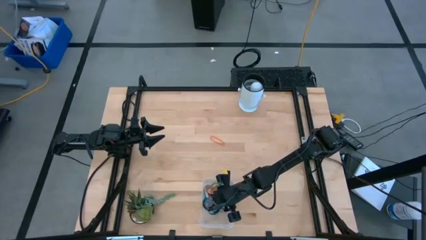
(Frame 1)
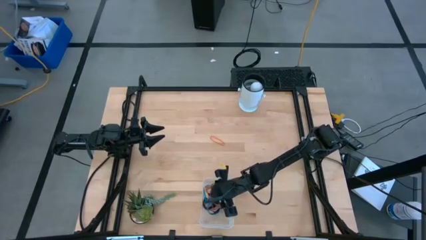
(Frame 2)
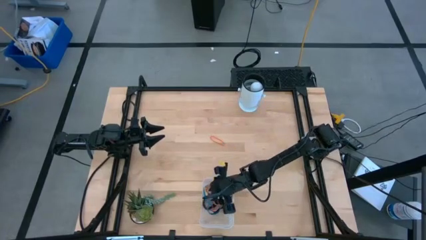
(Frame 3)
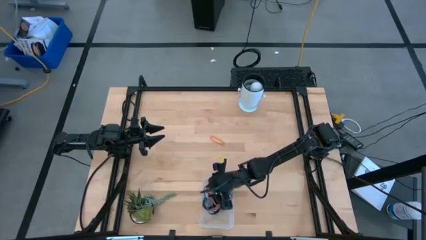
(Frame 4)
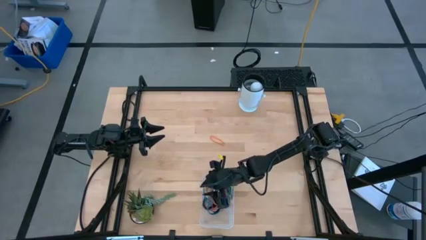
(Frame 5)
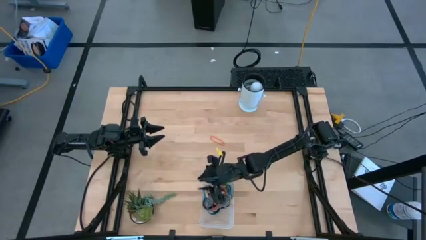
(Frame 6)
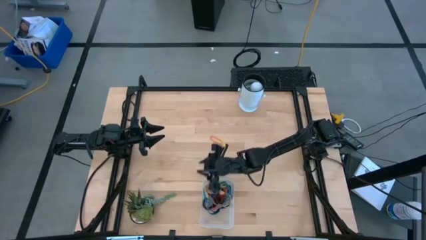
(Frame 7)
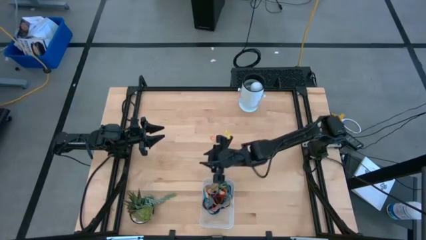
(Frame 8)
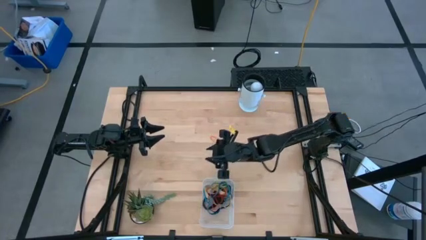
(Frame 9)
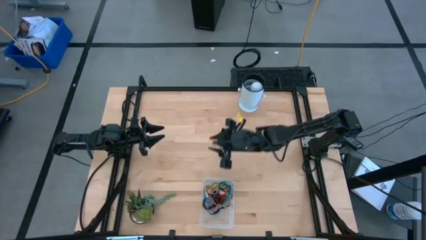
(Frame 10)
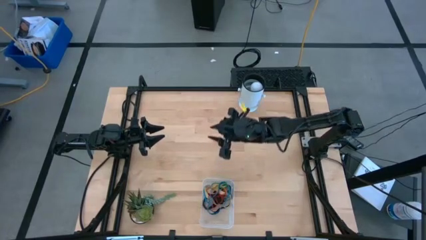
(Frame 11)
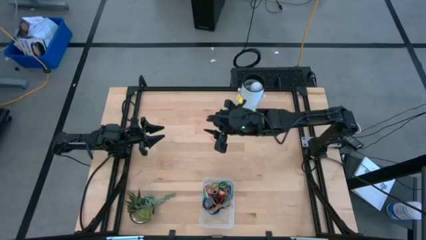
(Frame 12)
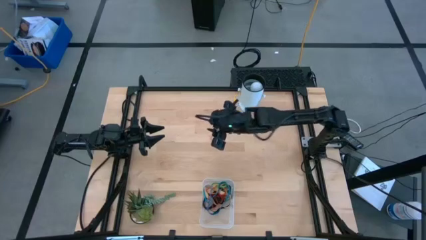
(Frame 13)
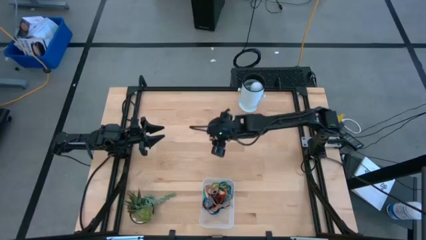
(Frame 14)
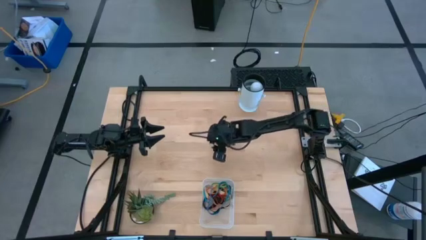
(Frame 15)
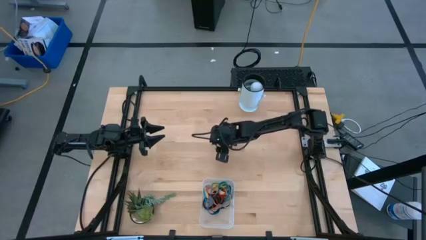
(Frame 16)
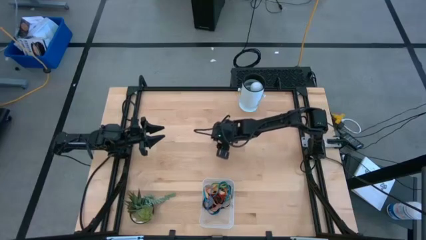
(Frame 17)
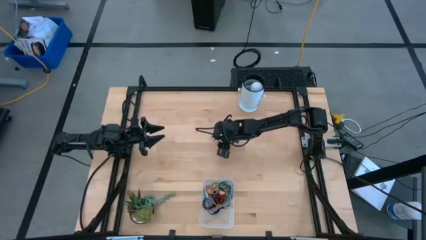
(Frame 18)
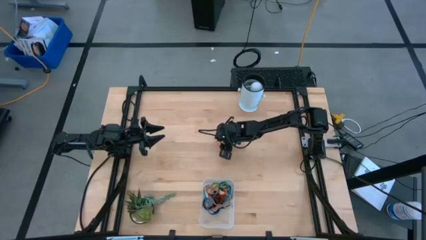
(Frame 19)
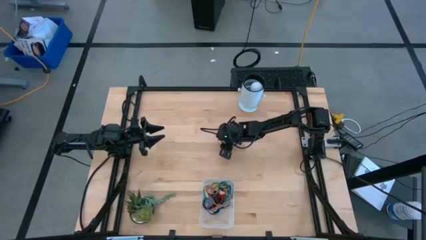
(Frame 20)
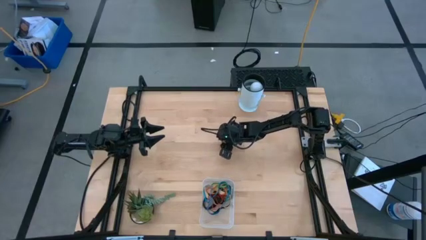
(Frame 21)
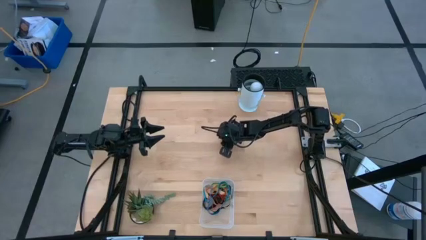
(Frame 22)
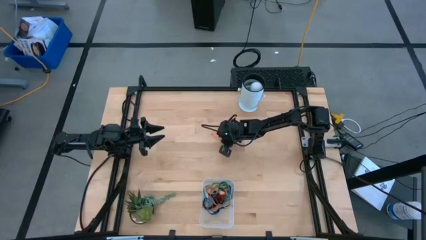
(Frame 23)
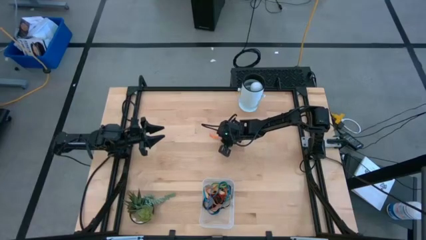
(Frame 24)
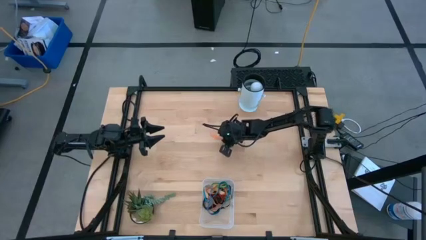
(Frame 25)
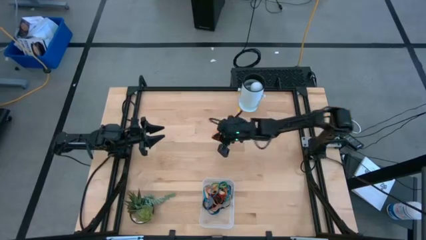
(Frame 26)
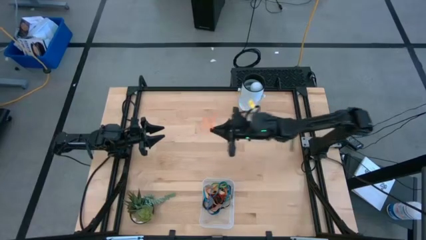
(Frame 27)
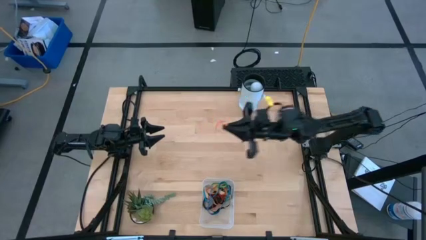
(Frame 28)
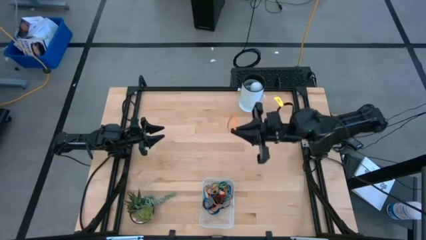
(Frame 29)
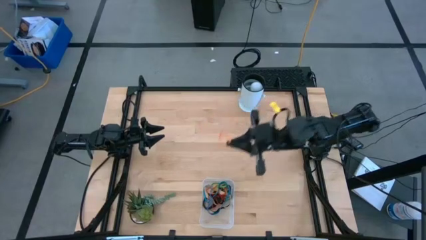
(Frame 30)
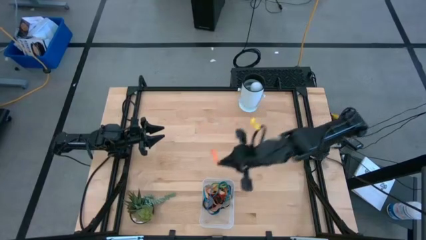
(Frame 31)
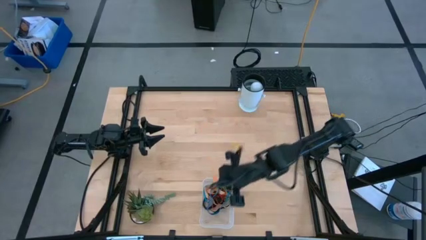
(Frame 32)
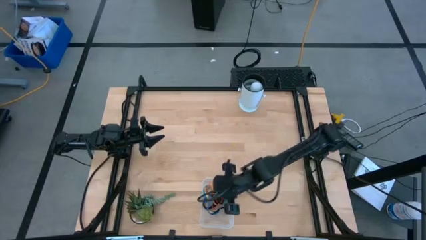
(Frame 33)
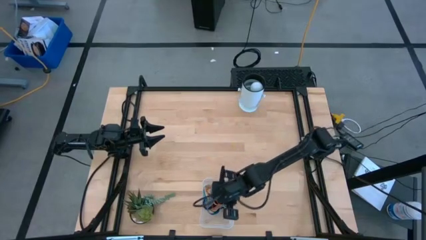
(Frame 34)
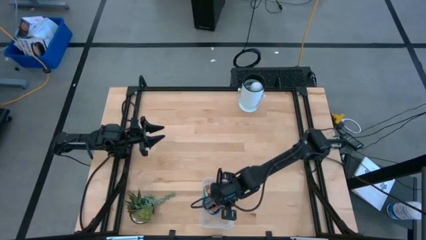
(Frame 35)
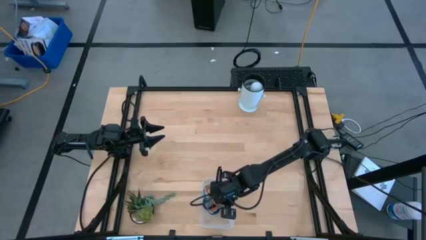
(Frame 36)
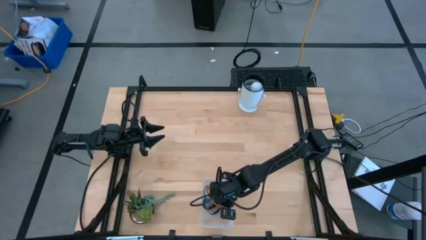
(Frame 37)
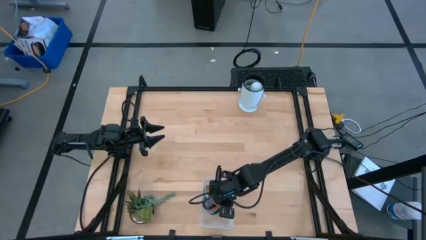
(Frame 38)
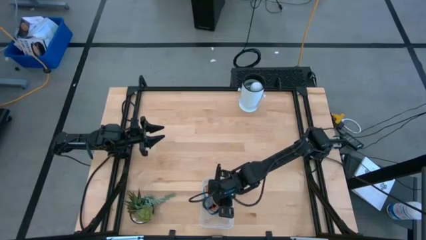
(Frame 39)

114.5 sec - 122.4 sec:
Task: Pick and place rubber bands into bin
Put the orange rubber band into the transparent bin

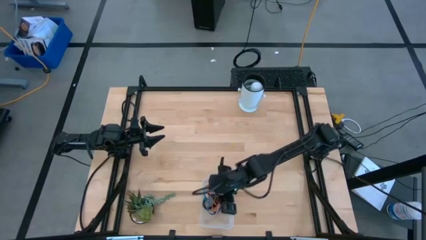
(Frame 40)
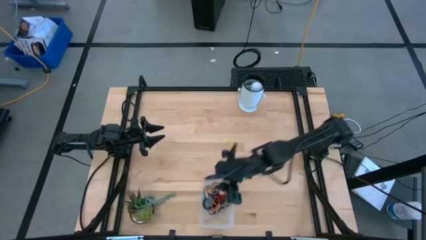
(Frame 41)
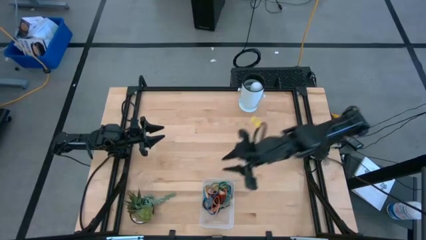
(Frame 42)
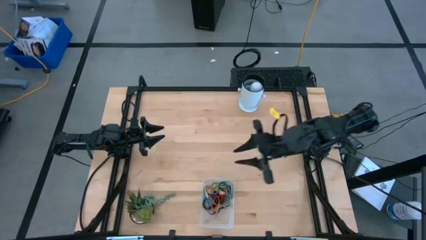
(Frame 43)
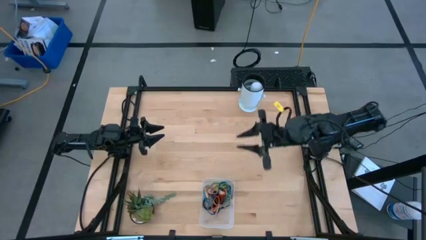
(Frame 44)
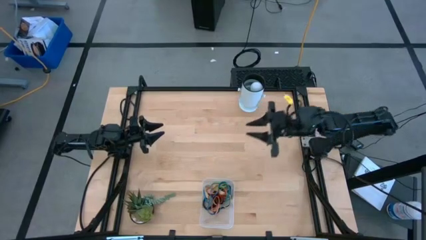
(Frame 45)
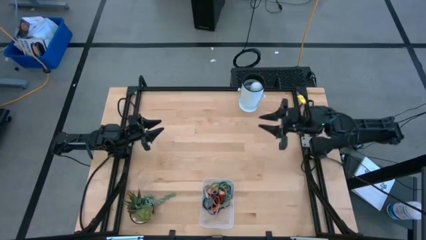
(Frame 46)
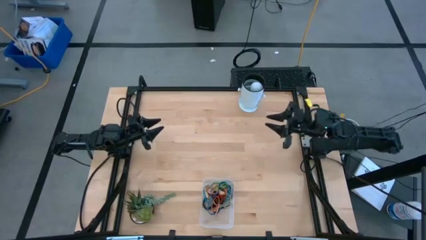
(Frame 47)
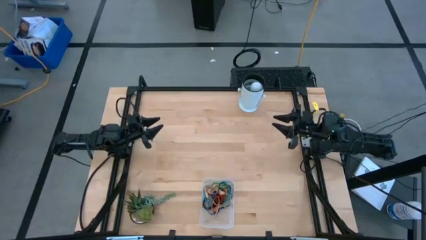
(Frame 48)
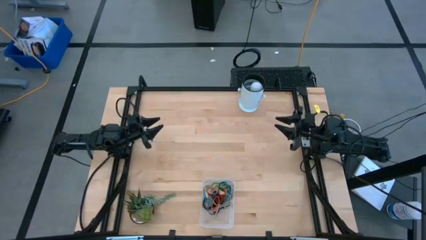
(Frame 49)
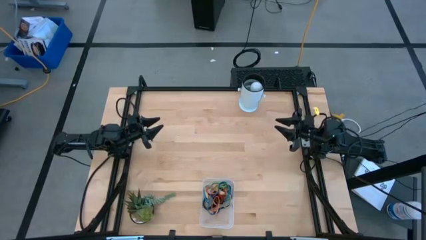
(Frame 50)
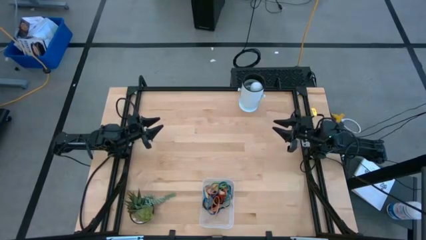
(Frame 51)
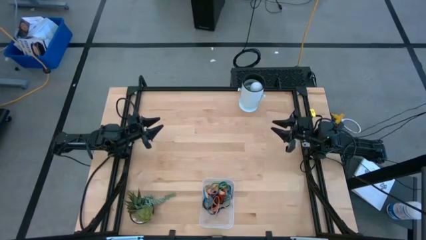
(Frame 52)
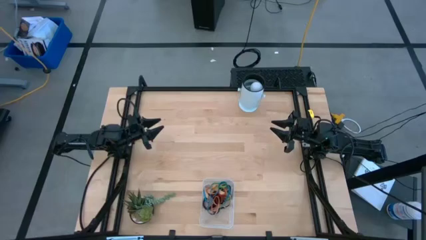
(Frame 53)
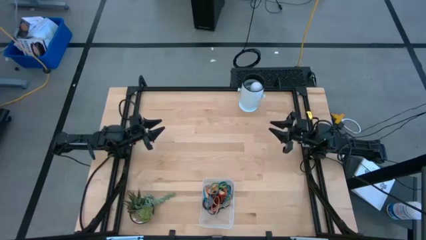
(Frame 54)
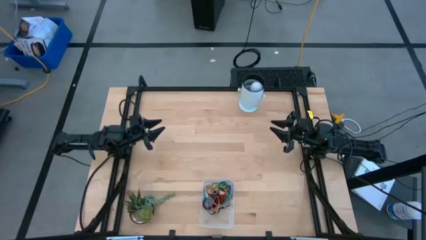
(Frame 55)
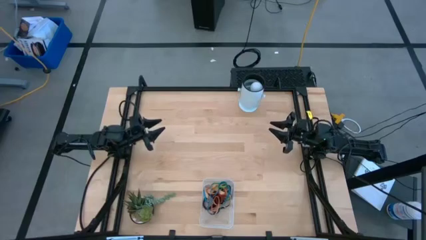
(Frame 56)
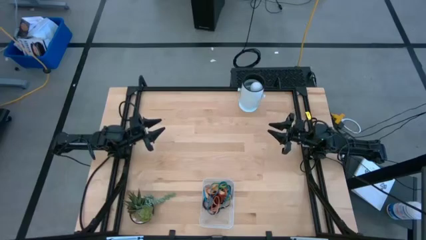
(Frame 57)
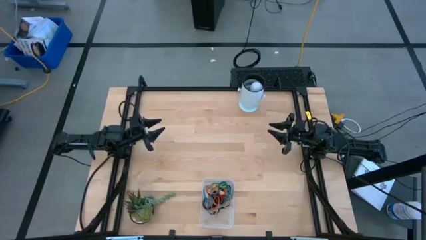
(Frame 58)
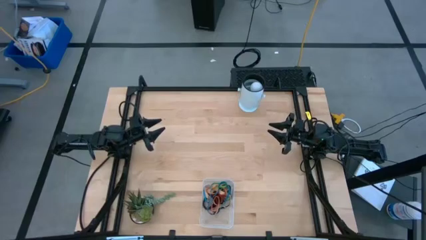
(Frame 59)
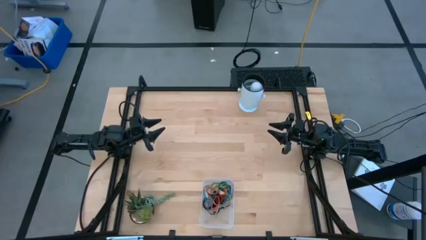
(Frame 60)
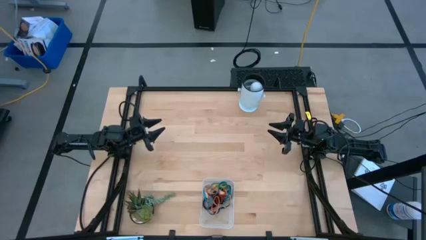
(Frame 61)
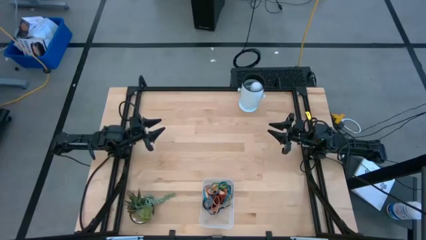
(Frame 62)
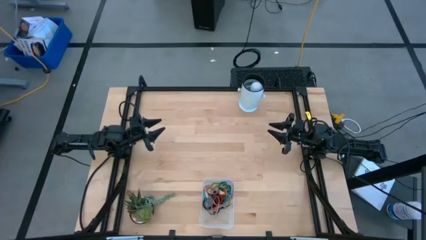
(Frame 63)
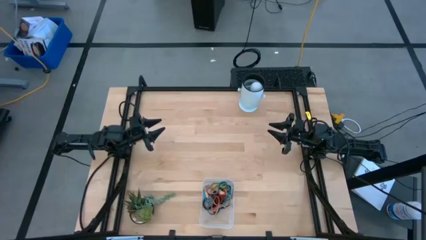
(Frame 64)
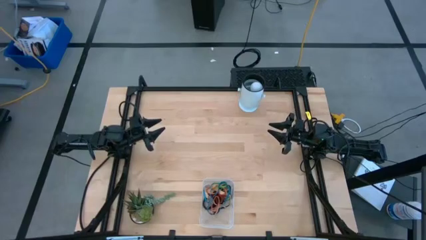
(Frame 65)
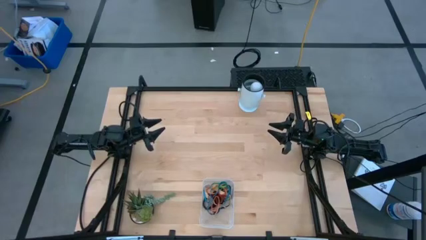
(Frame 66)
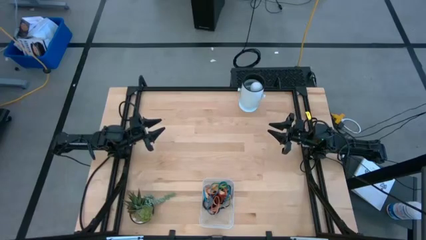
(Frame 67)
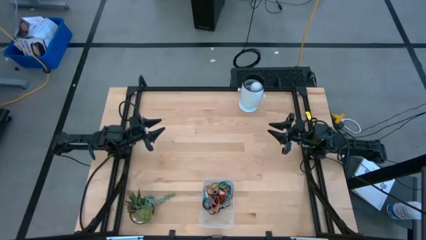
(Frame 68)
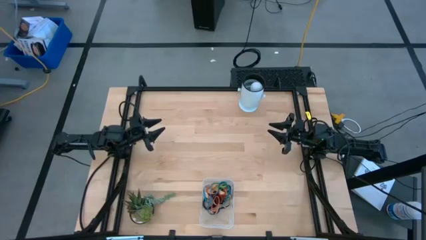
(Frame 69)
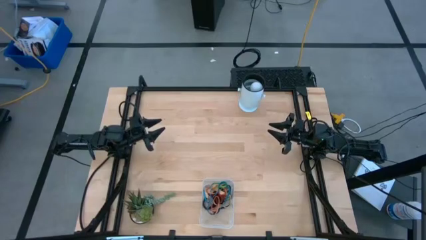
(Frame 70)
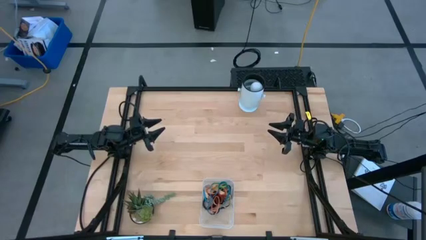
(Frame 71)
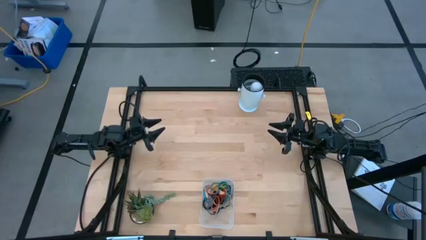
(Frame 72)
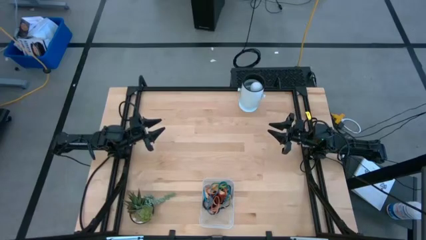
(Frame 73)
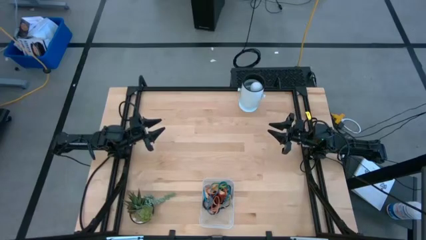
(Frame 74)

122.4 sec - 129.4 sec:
Return to Home Position

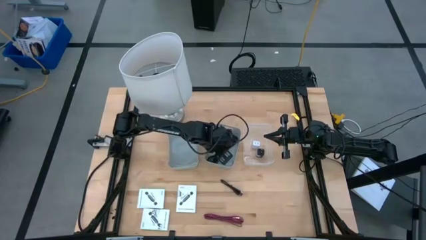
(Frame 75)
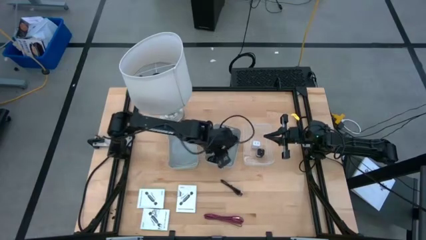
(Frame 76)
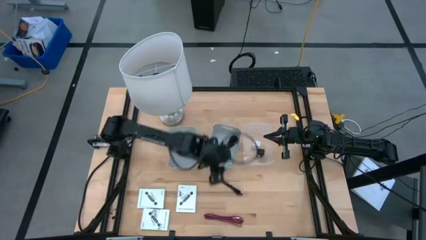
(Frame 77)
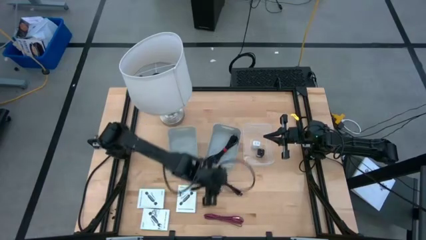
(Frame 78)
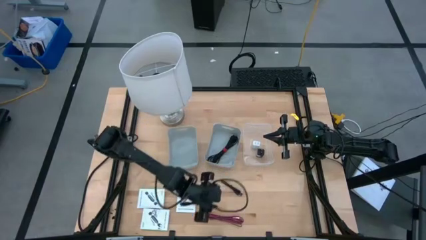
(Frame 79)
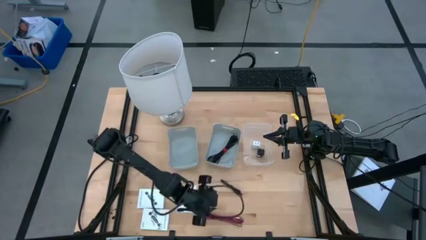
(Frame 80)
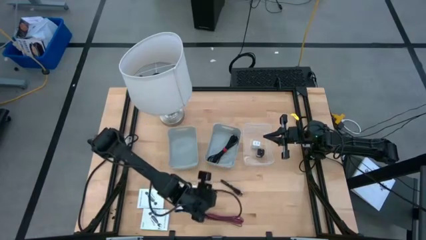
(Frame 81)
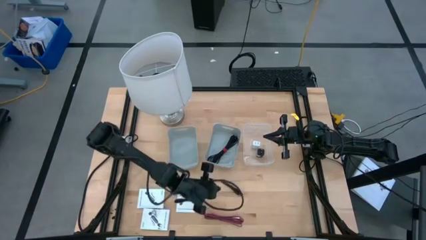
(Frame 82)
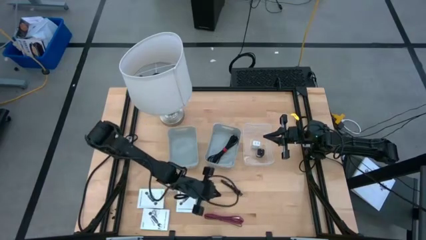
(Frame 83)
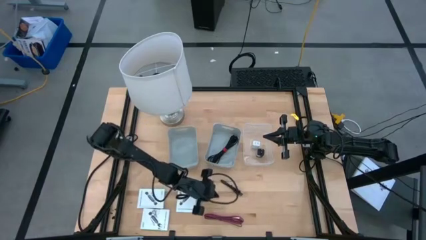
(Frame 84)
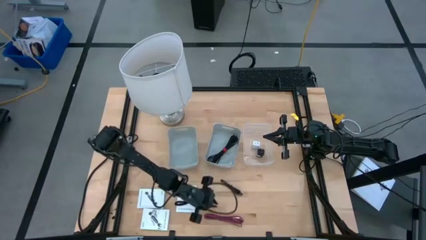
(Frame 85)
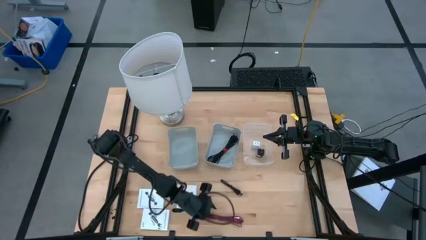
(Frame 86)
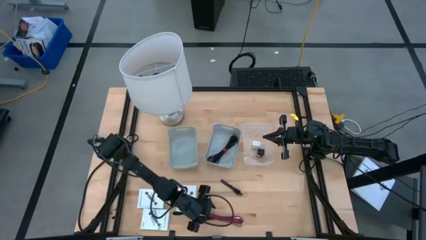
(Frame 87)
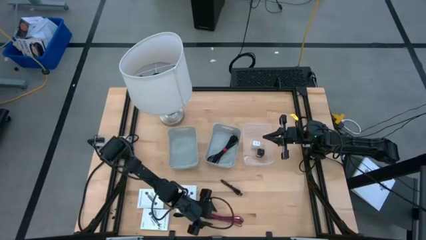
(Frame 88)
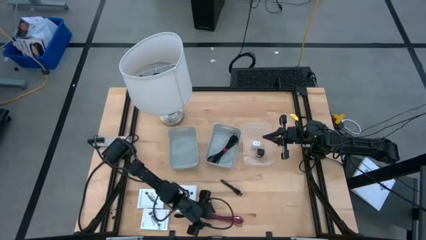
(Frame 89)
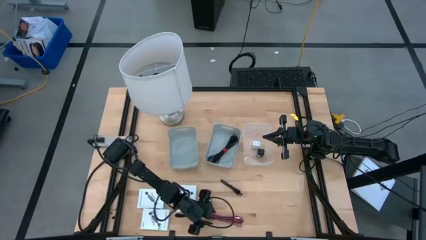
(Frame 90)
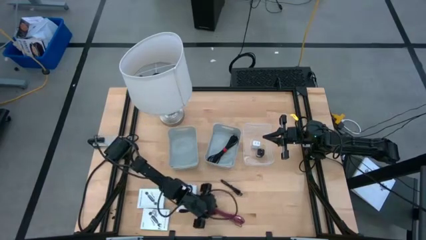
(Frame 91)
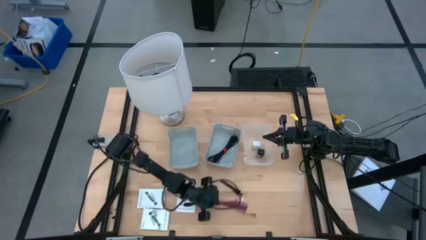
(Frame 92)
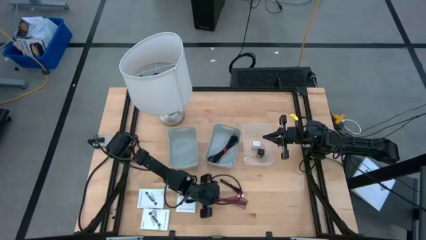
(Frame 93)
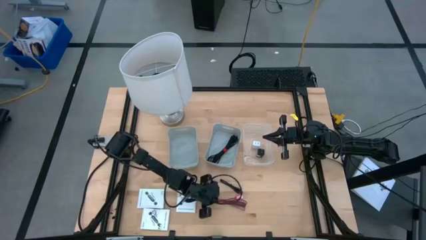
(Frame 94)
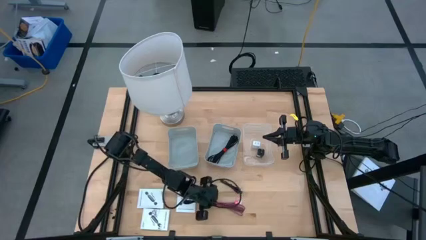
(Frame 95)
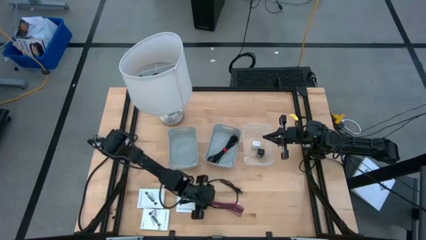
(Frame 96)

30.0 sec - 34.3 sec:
Task: Pick and place items into bin
Put the pink charger cable into the right gray bin
